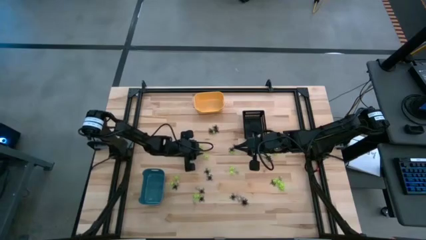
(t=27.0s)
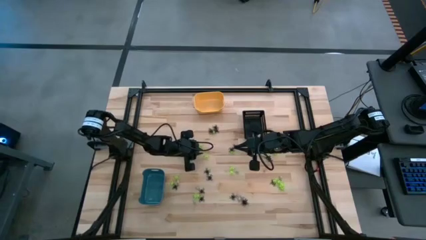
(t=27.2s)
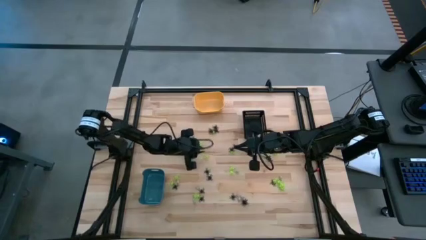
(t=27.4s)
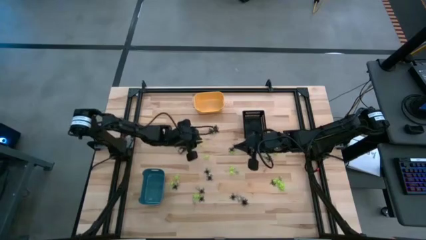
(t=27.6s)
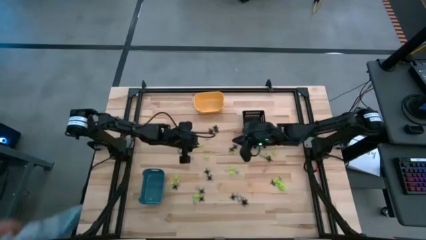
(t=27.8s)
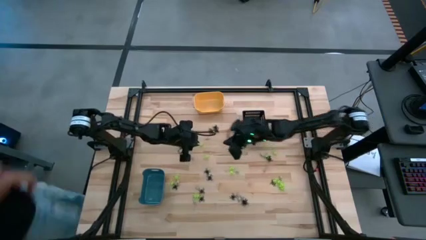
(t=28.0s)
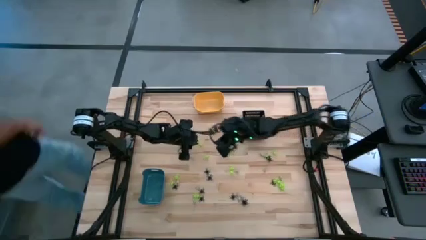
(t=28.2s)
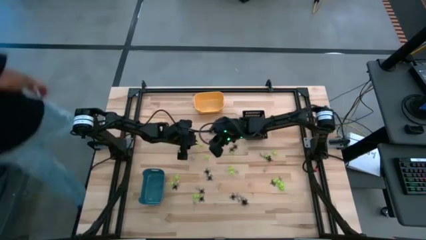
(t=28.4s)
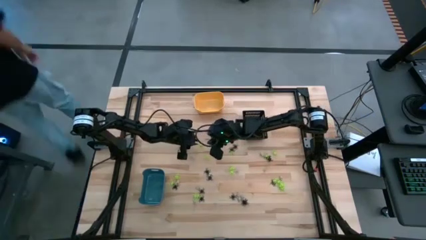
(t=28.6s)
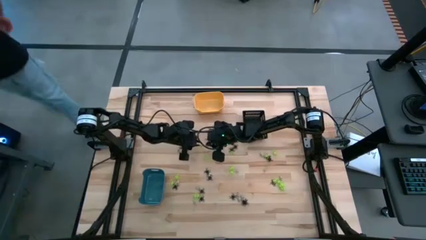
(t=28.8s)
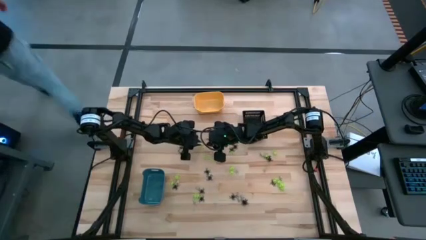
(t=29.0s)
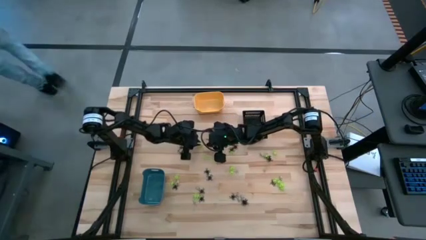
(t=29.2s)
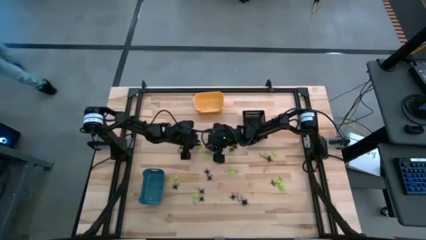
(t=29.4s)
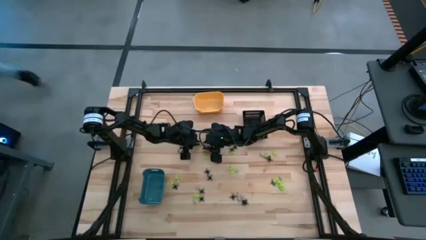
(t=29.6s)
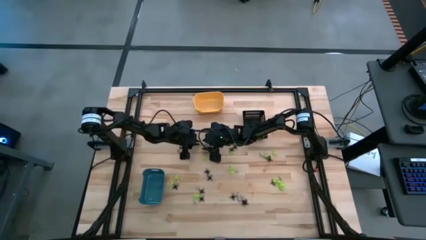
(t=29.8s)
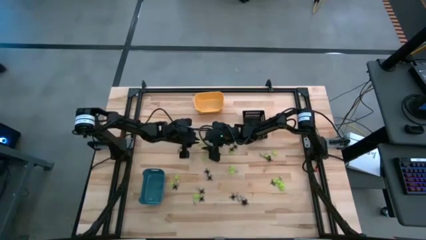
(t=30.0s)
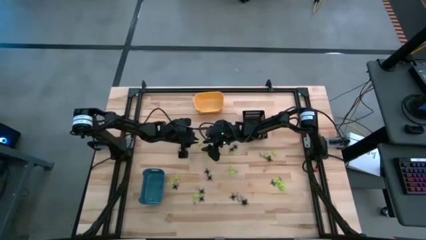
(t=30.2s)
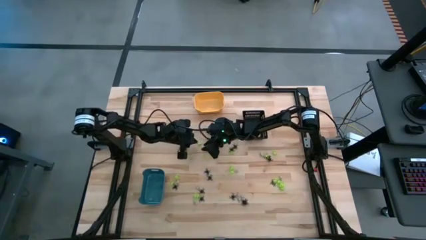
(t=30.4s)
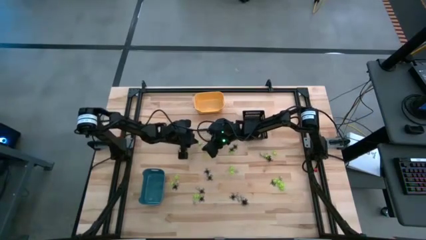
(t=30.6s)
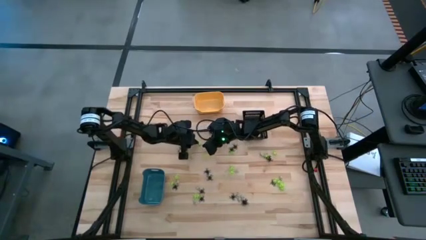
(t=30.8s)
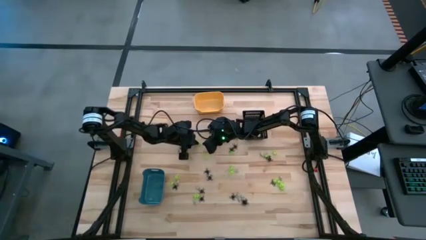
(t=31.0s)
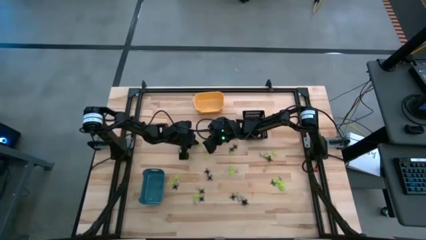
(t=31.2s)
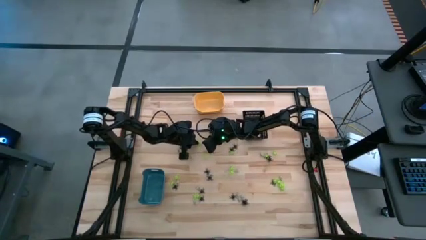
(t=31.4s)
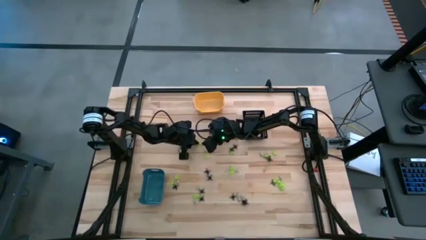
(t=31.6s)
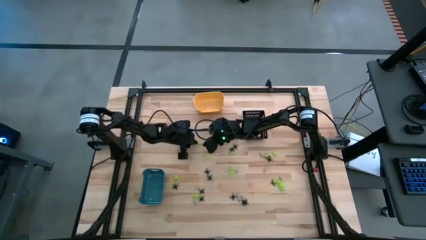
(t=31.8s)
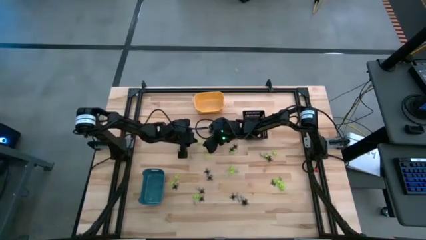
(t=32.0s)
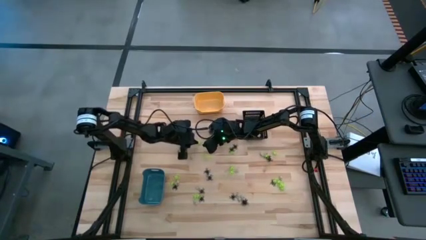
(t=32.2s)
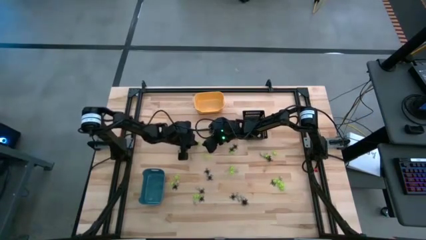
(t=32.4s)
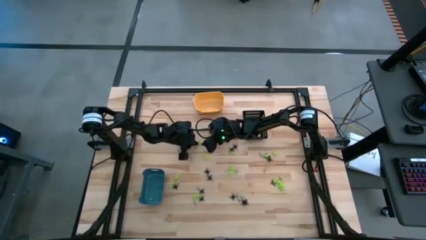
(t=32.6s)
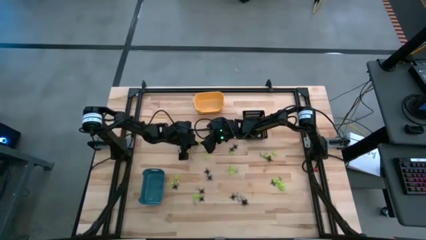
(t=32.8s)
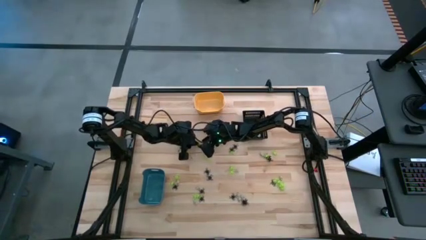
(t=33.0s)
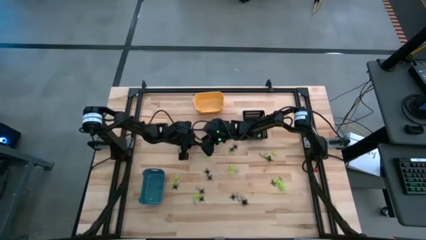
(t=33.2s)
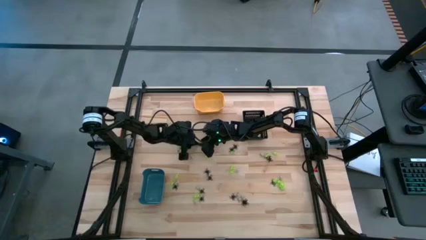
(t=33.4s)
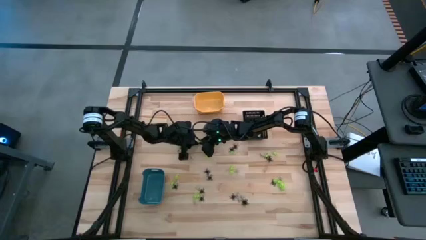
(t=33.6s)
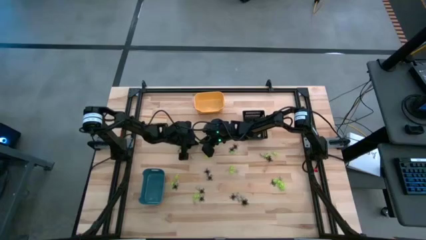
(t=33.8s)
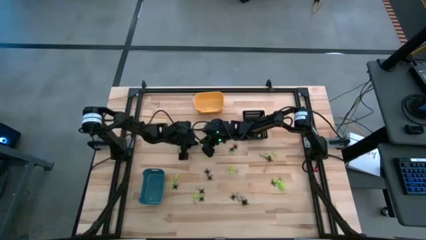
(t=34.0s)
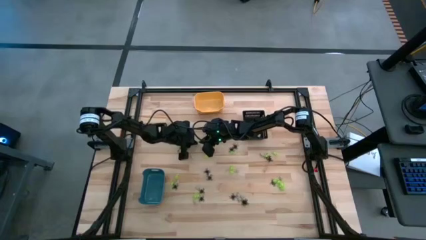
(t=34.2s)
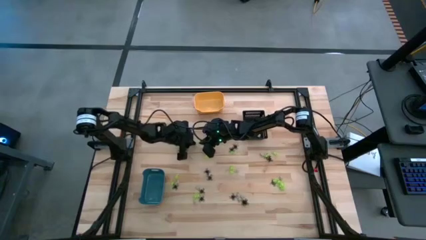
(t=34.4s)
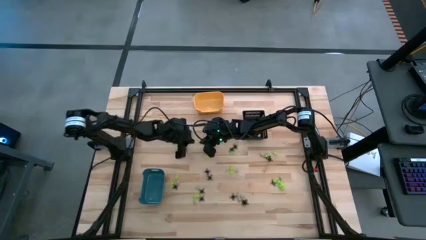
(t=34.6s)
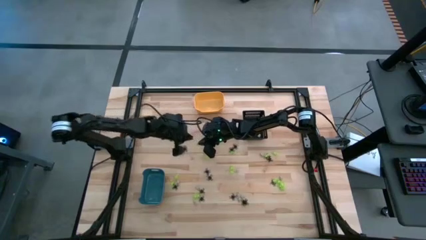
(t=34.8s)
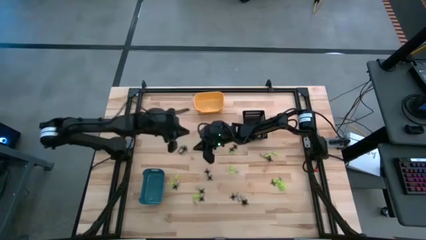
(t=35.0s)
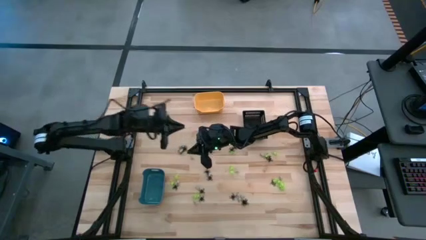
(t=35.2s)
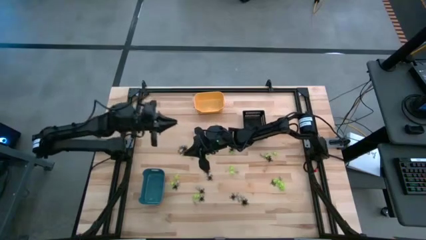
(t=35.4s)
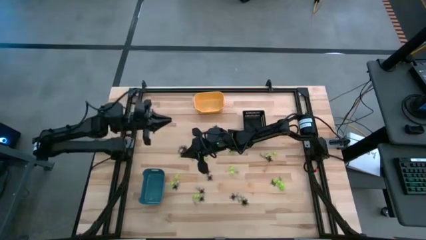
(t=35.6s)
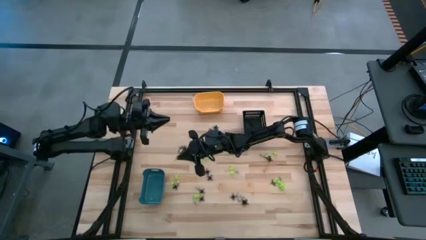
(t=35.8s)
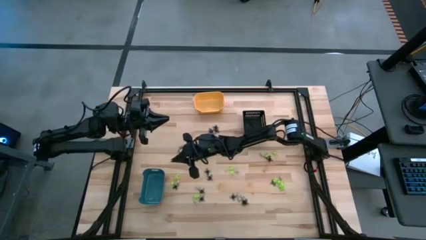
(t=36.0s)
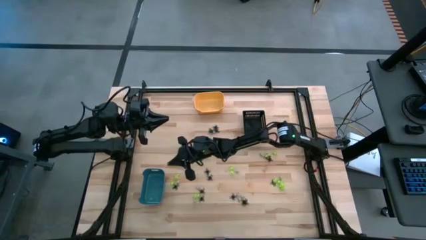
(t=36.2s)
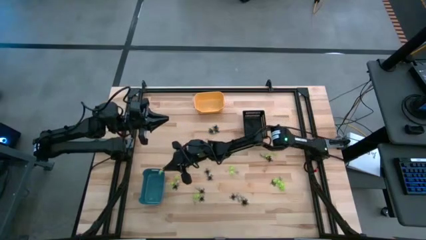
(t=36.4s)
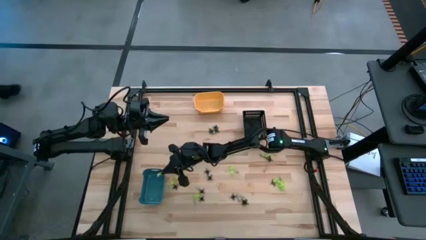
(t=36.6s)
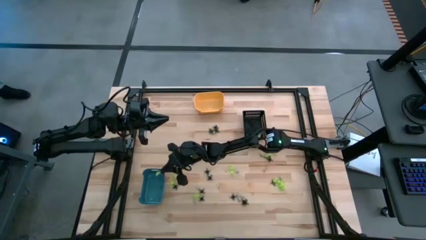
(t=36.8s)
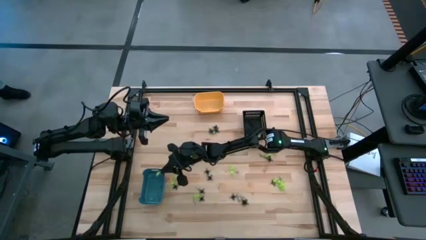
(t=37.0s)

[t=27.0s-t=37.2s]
Task: Sort Halloween decoration
Put the green spider toy into the blue bin

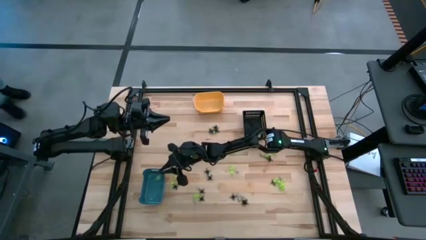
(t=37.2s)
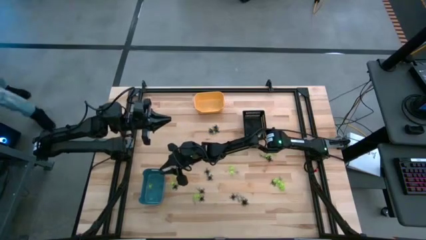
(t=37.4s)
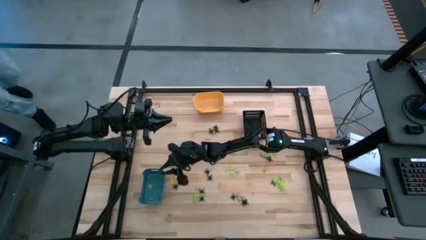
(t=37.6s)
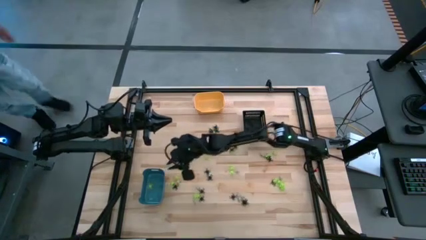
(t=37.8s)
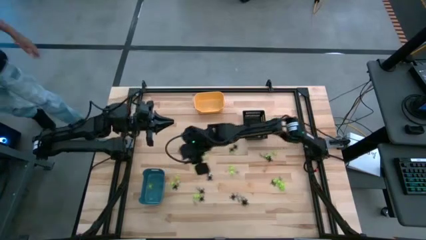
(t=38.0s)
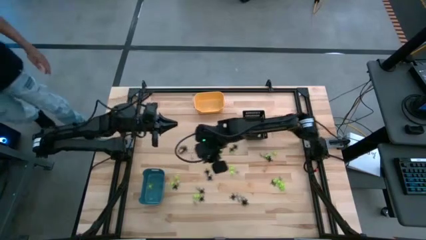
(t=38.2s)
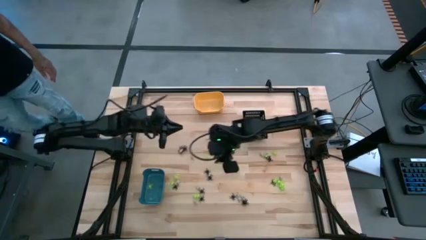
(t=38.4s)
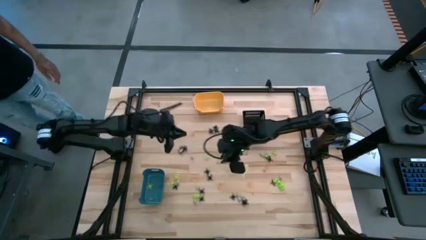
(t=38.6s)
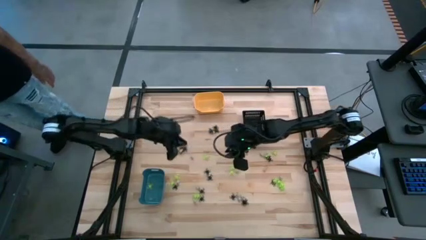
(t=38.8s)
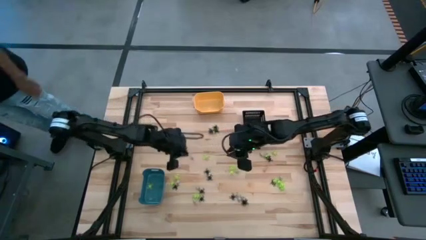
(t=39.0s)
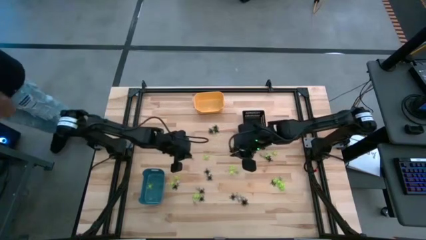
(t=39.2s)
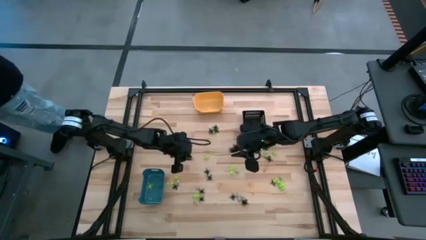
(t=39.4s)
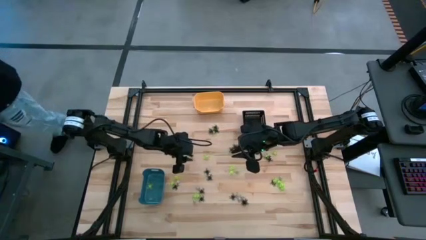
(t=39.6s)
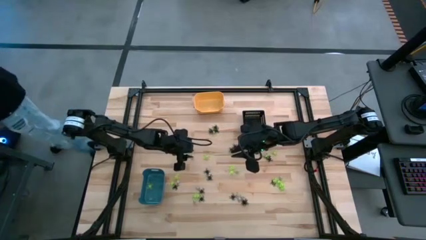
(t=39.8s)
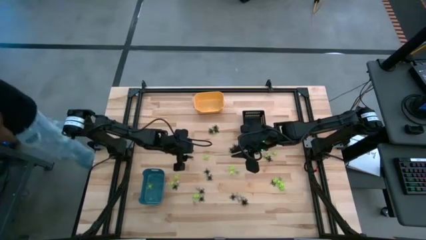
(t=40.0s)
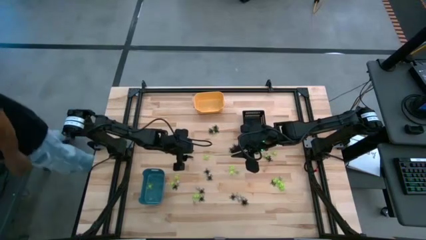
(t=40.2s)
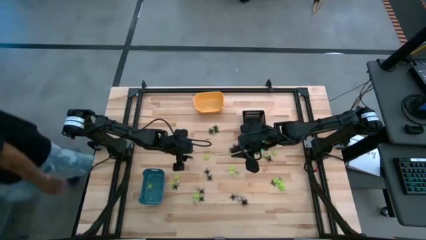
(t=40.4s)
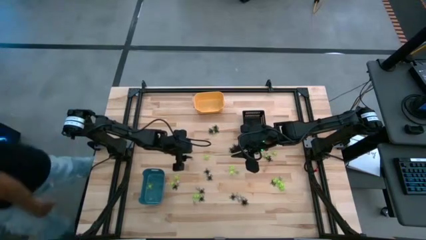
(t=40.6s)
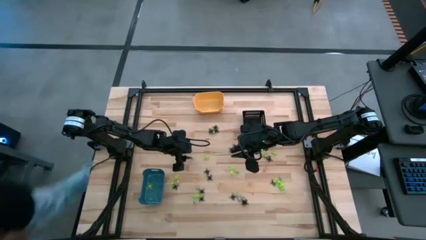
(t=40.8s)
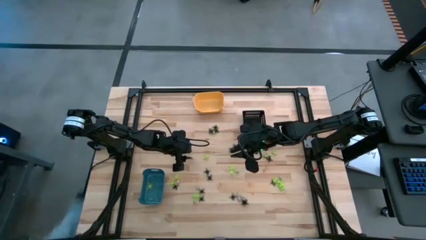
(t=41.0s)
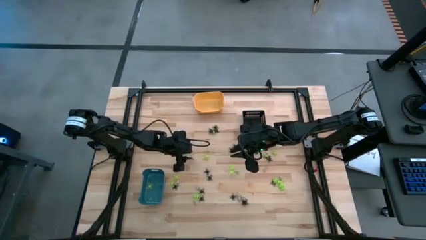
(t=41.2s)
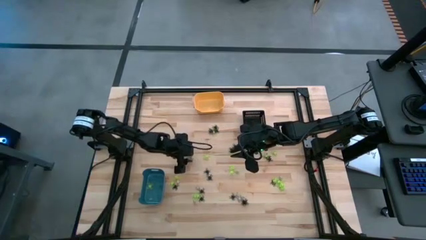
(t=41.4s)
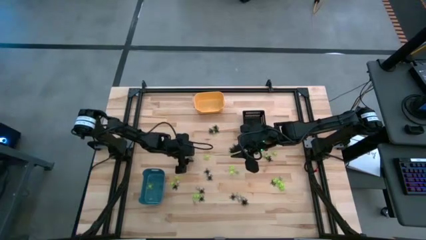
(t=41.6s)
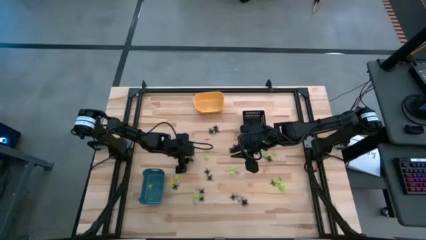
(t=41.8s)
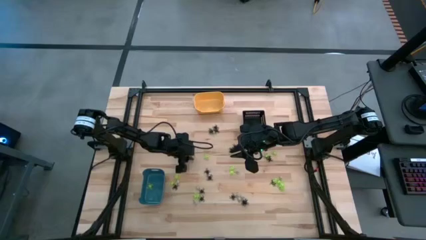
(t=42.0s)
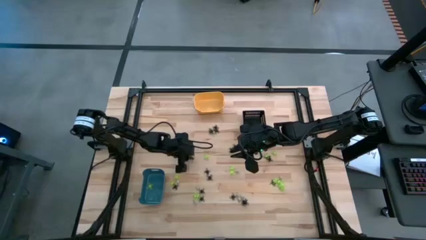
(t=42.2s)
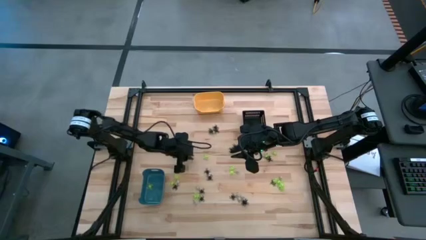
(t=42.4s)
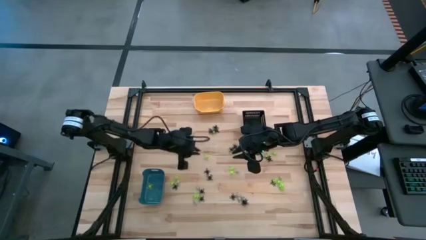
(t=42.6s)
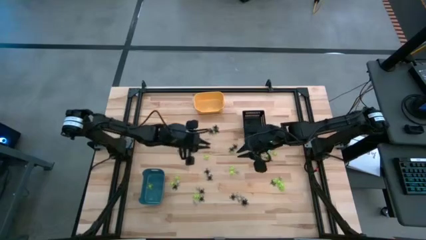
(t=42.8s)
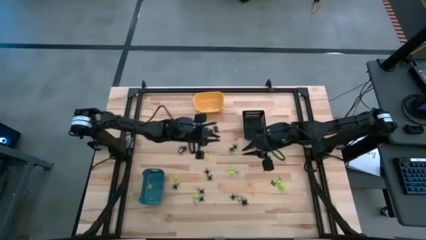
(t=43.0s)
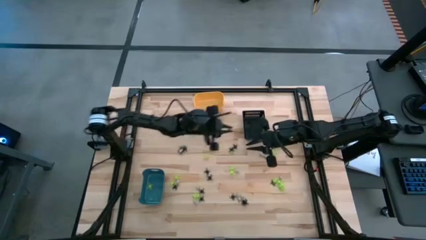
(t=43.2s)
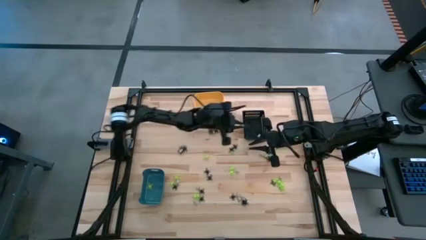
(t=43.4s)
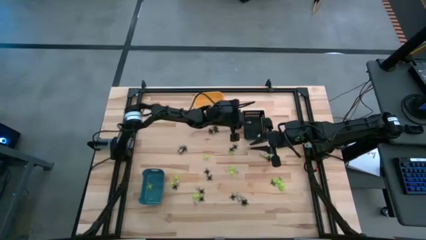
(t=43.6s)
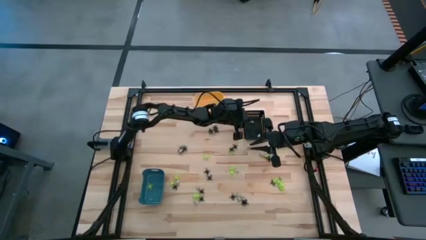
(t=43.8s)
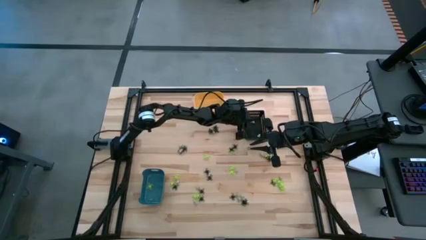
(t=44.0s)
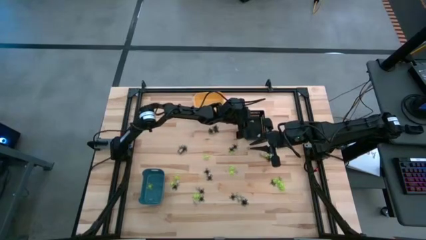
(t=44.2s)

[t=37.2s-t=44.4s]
Put the white skull toy into the black bin
